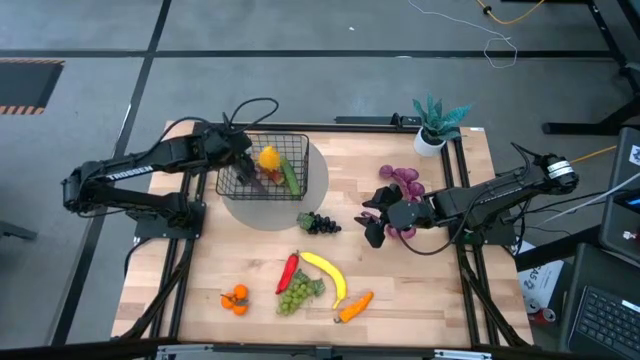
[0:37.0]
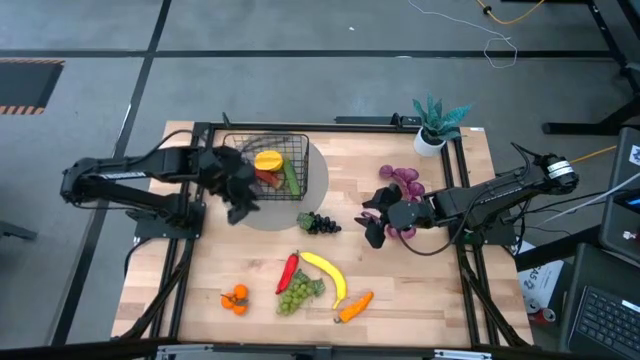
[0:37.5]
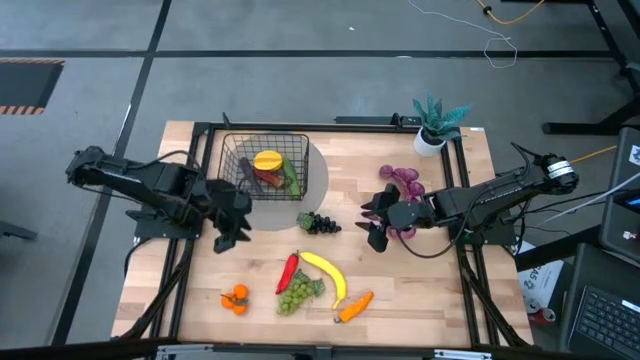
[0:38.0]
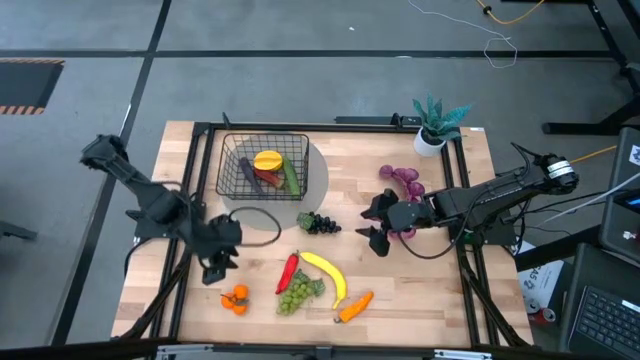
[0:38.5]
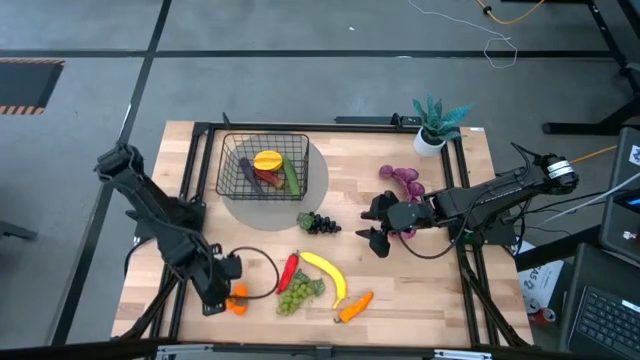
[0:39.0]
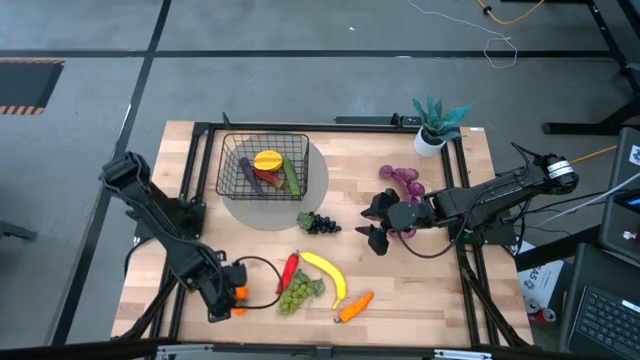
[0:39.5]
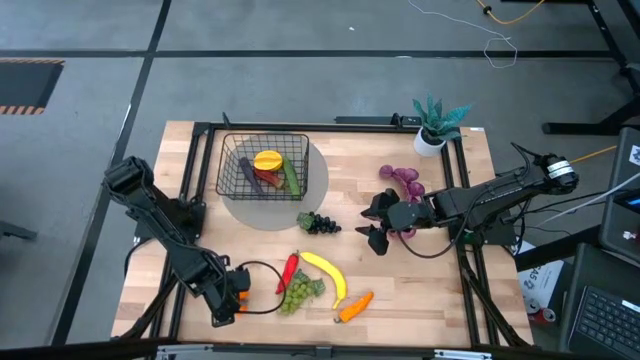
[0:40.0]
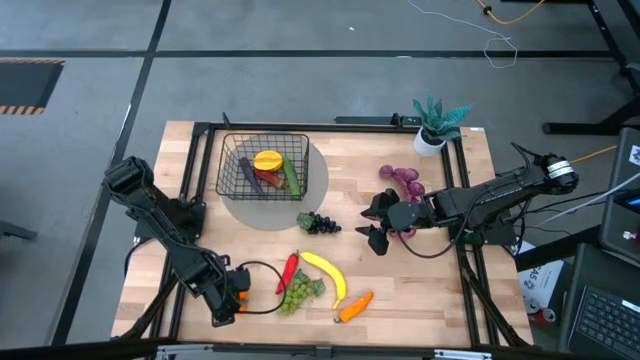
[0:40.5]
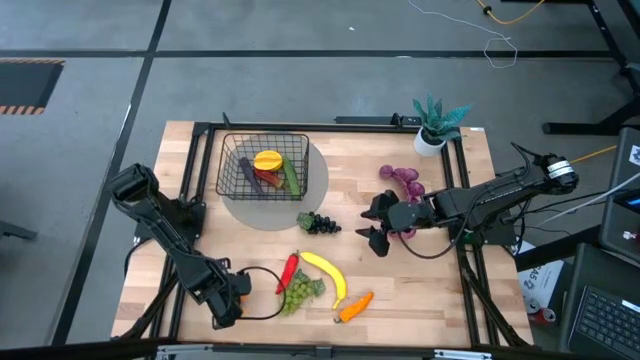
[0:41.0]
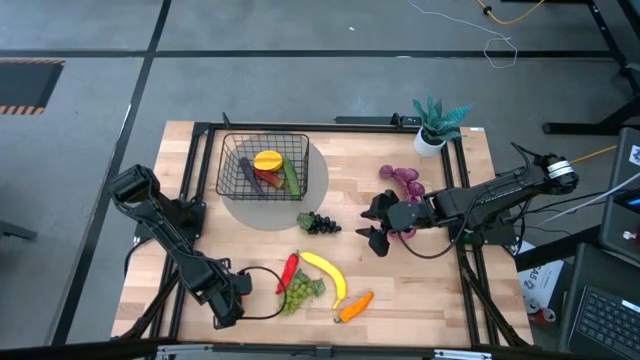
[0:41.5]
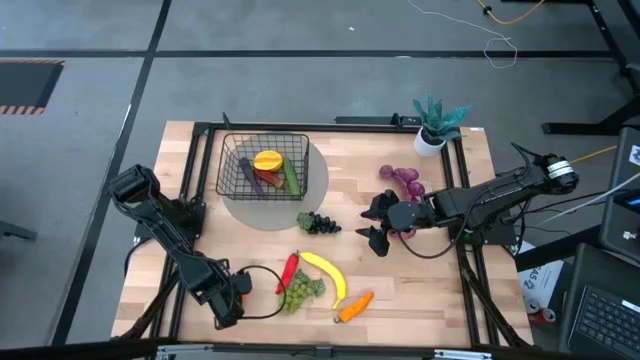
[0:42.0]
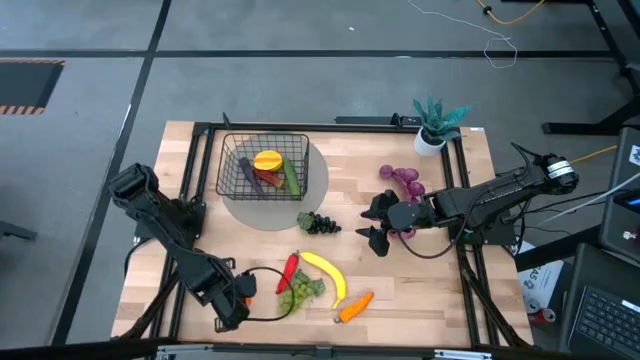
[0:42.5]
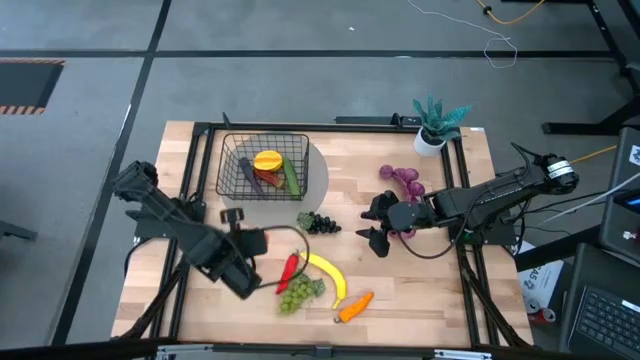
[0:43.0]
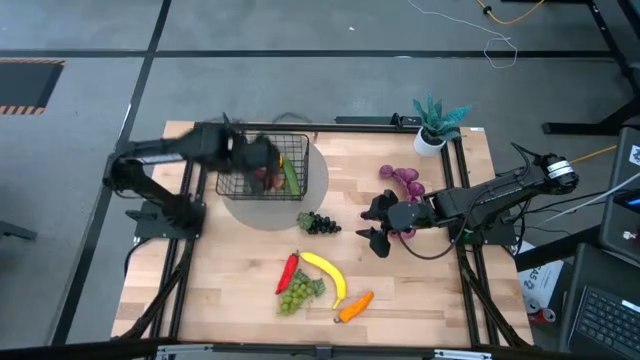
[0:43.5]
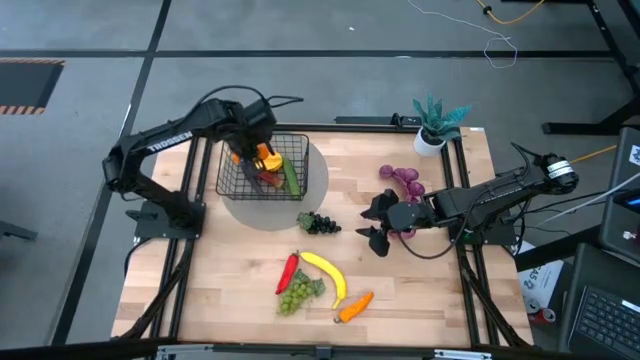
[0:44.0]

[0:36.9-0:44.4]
Task: Build produce basket
Put the tangerines into the wire basket

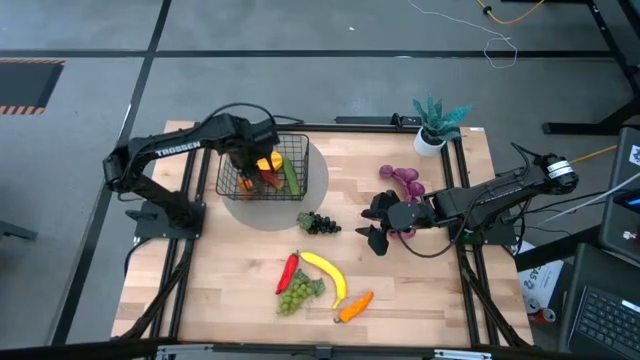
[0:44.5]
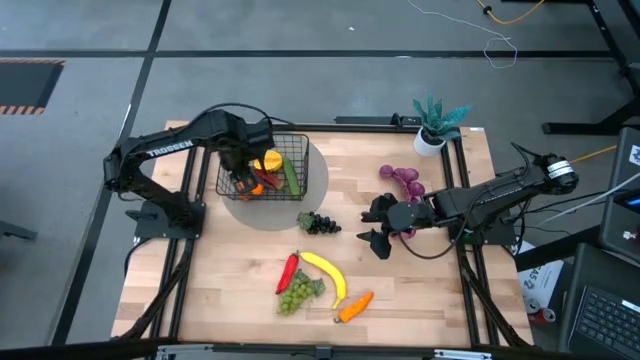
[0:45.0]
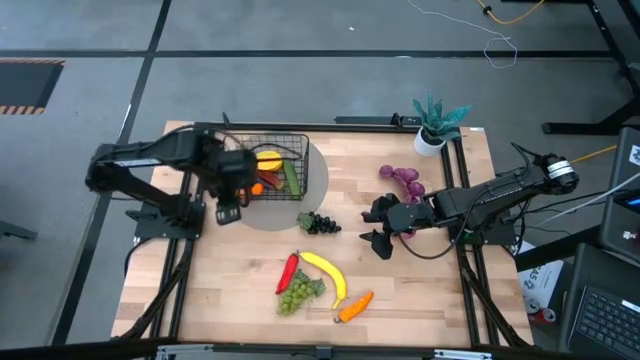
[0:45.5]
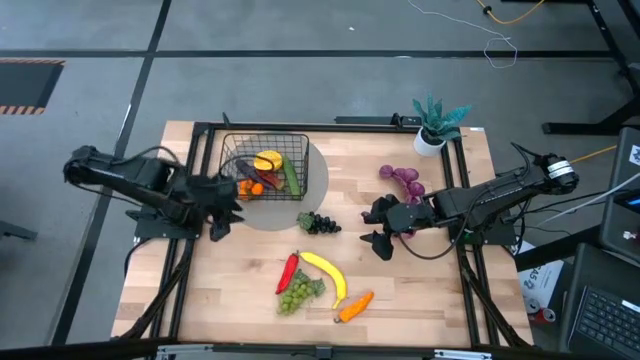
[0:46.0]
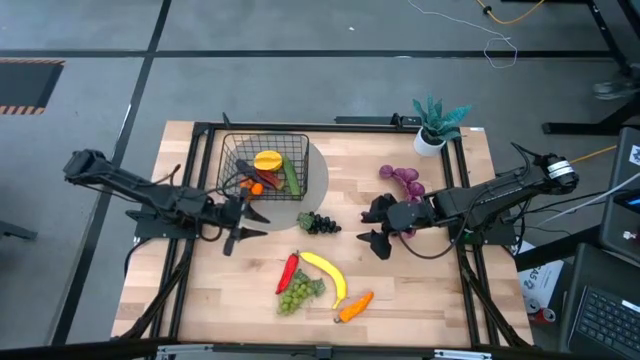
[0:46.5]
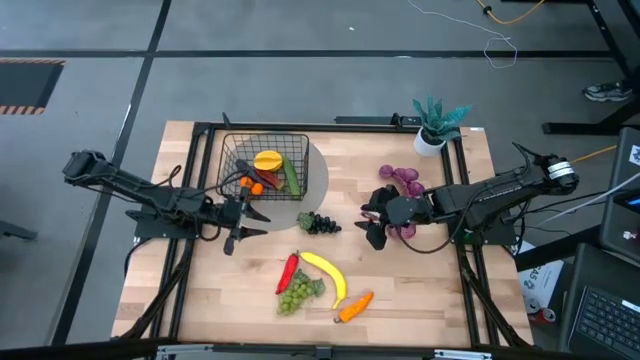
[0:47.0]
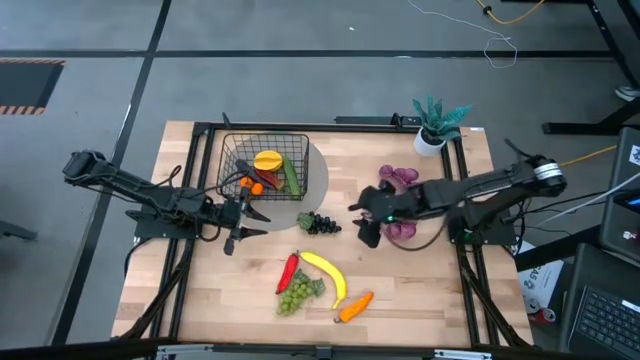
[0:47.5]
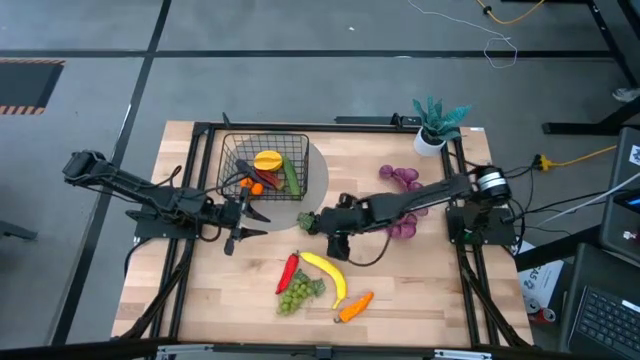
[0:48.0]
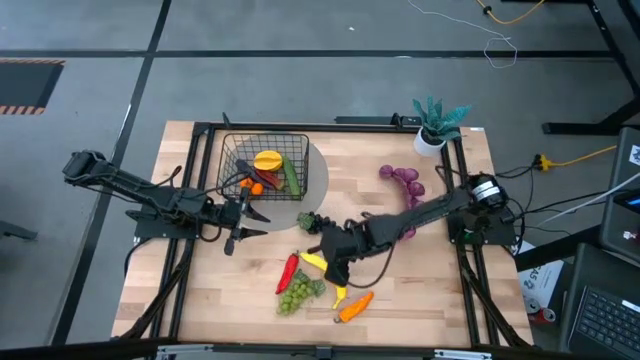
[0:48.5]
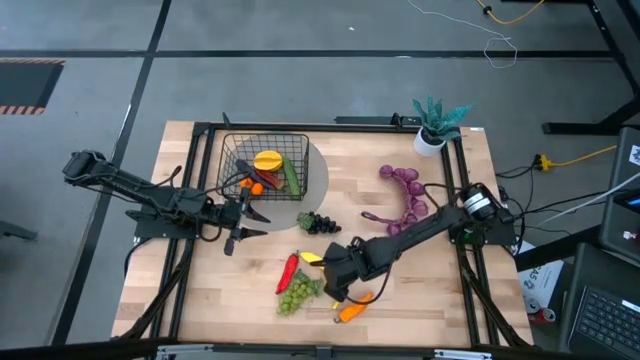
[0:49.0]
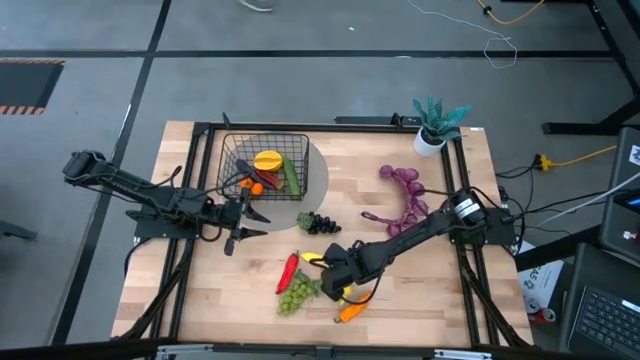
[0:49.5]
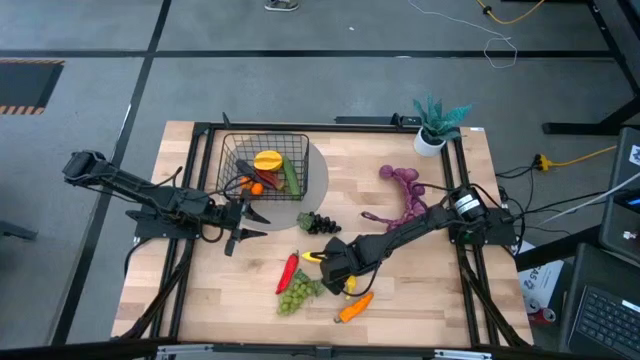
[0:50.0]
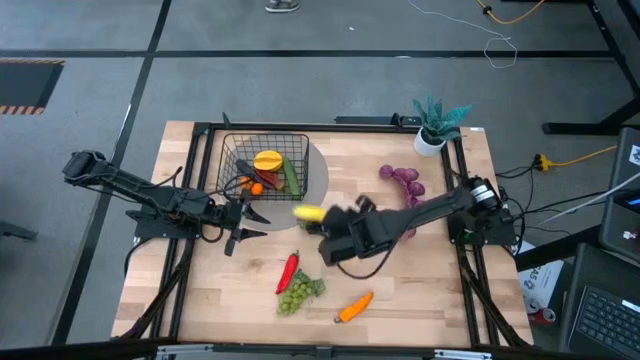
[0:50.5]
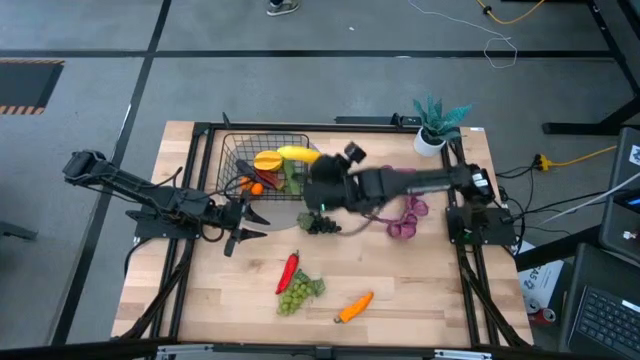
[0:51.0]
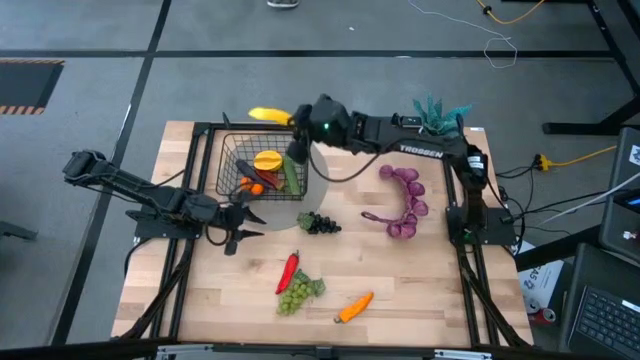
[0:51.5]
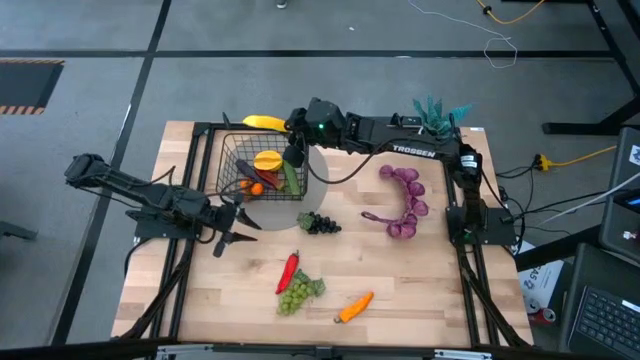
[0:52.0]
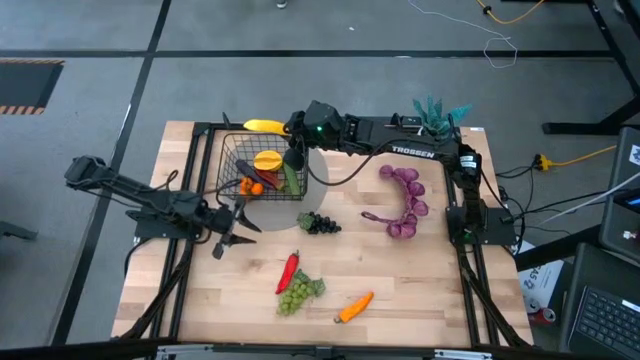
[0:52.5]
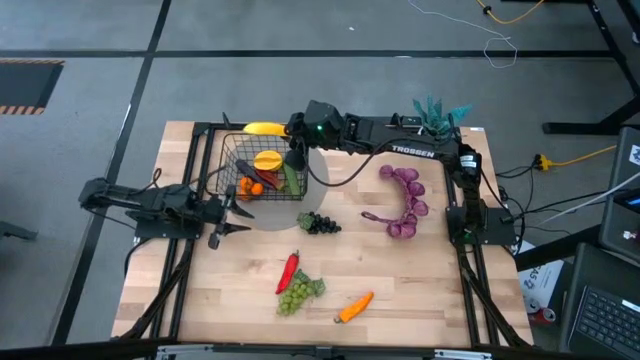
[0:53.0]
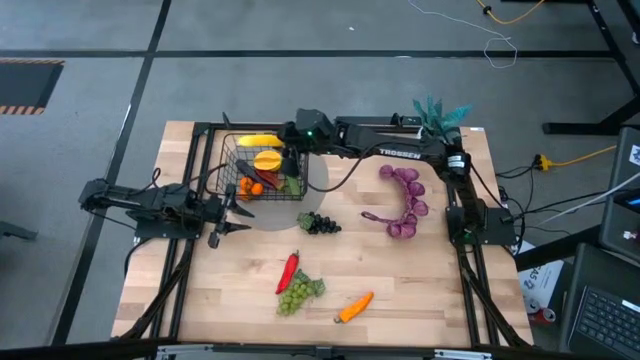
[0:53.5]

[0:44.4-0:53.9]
Put the yellow banana into the wire basket

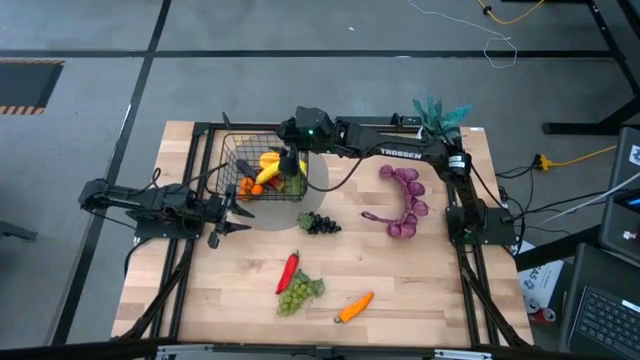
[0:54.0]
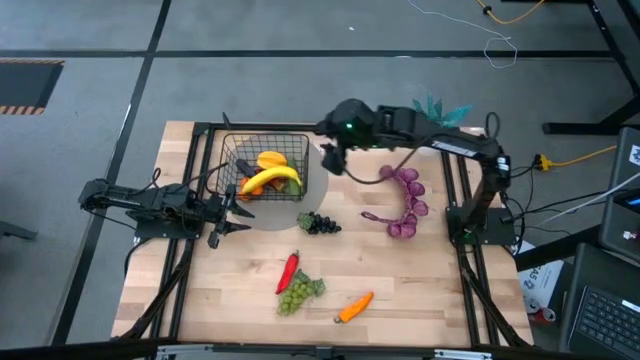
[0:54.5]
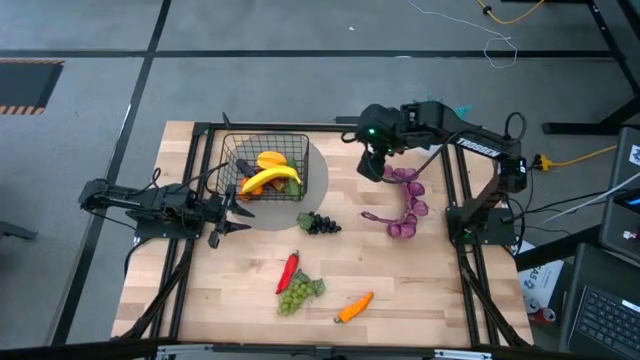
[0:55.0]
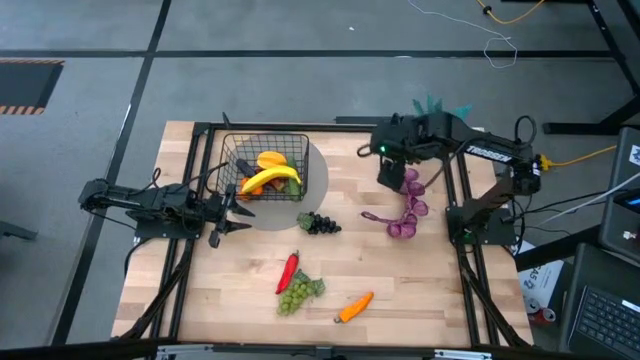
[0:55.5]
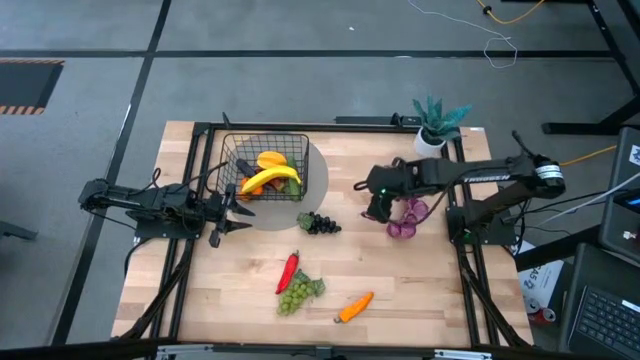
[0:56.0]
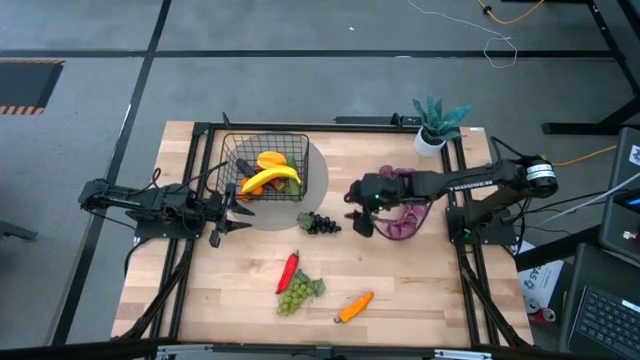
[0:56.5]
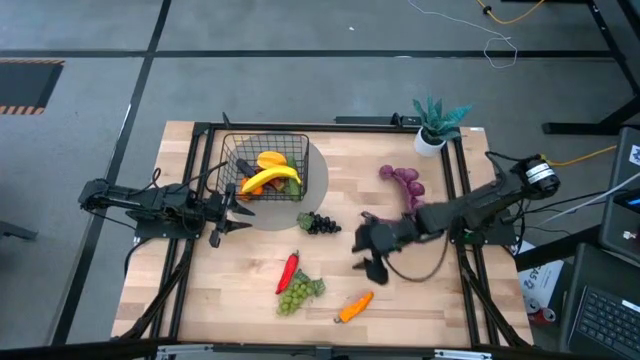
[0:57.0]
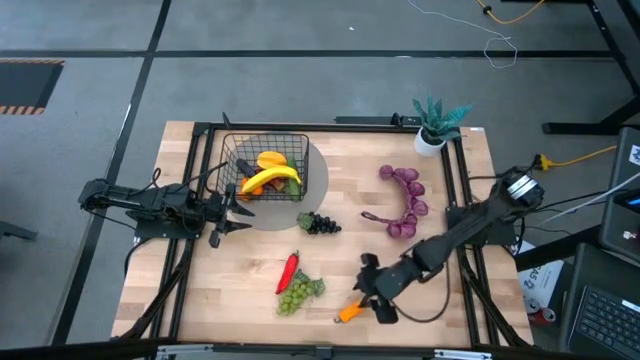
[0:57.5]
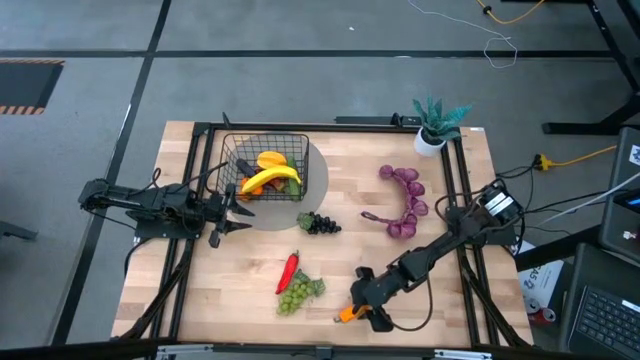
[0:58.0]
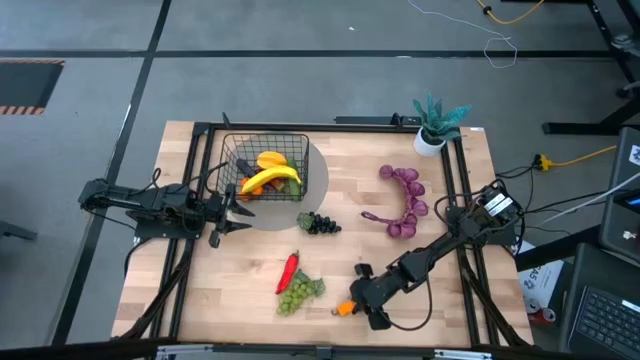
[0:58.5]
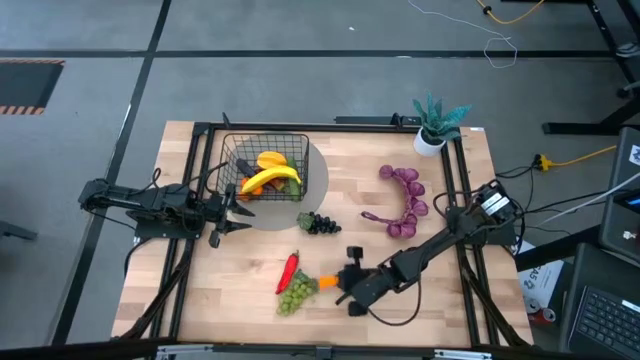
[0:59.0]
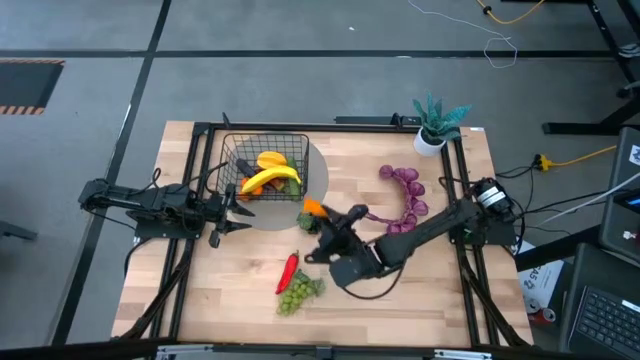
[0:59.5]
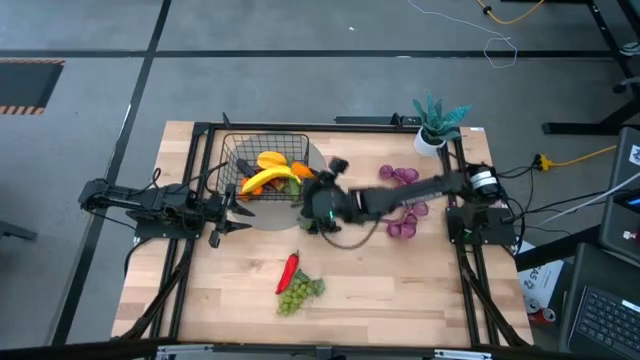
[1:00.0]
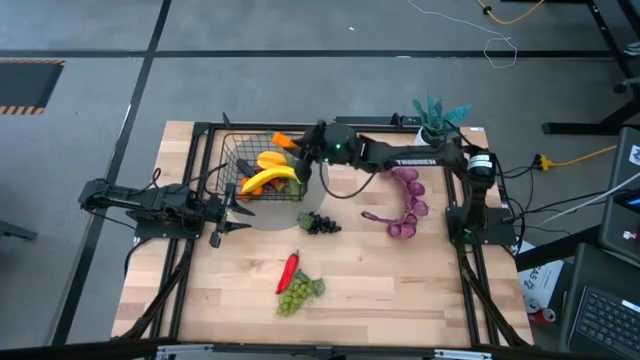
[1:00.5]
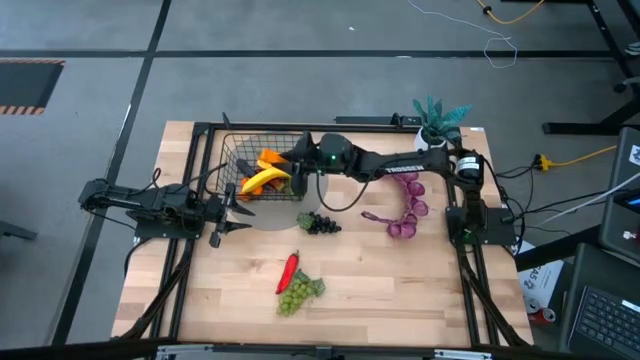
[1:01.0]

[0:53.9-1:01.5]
Put the orange chili pepper into the wire basket
